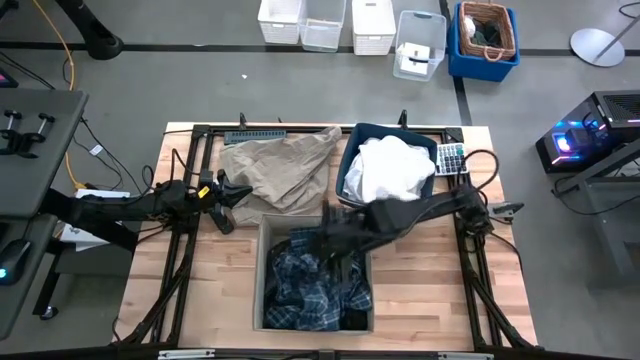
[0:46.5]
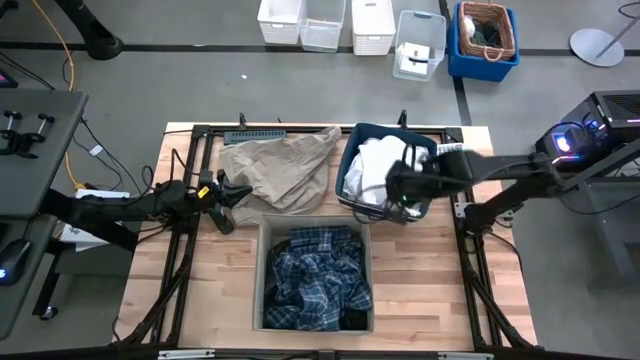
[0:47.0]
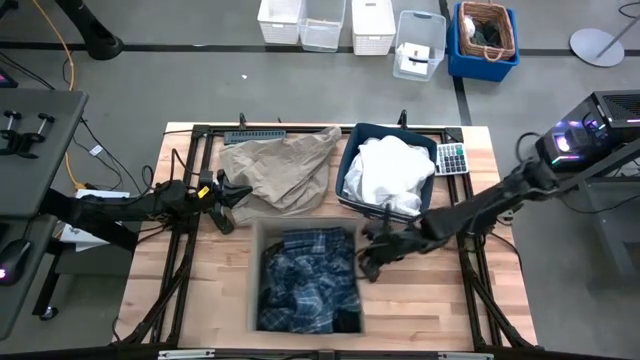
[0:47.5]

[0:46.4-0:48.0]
Task: Sort clothes
Move the white laundry bin to the left

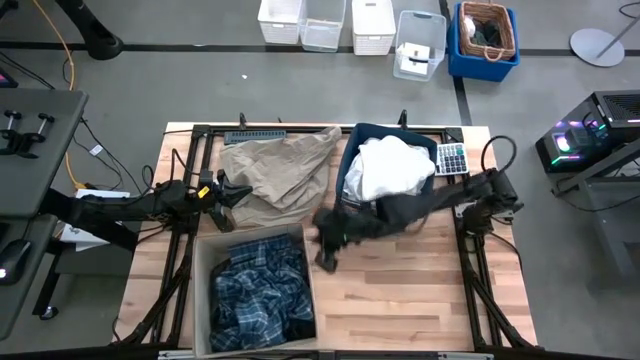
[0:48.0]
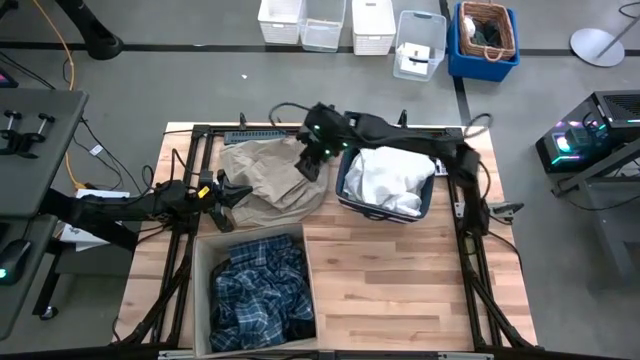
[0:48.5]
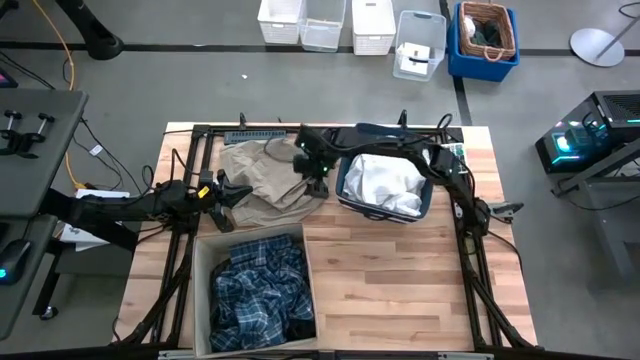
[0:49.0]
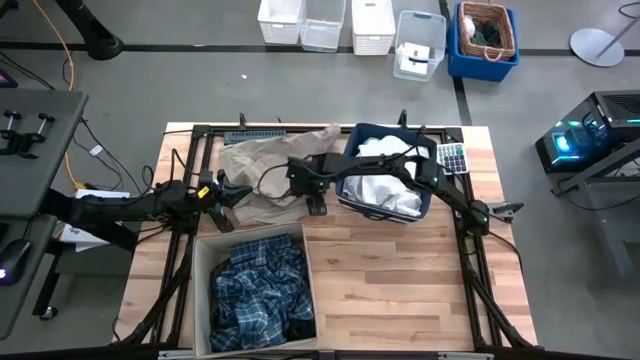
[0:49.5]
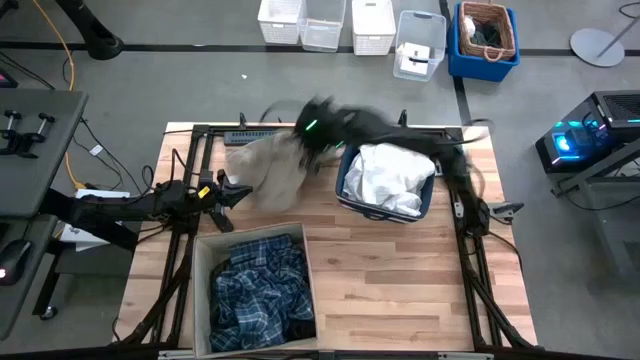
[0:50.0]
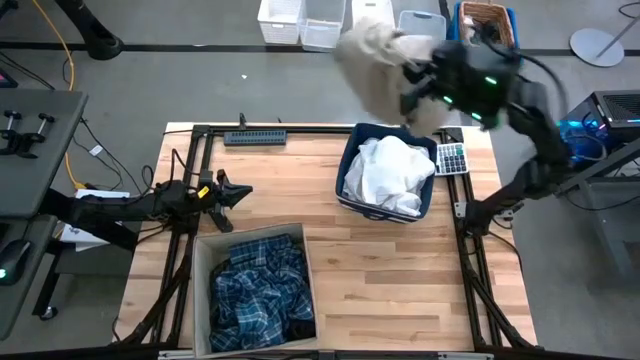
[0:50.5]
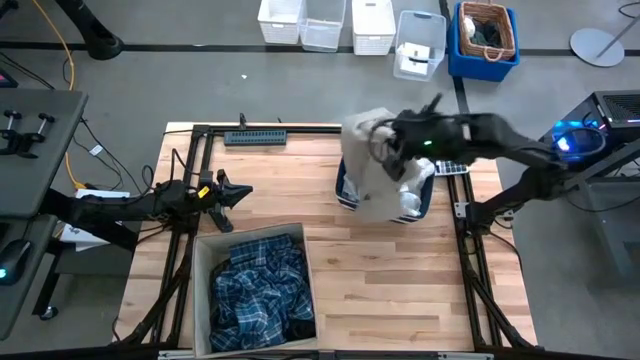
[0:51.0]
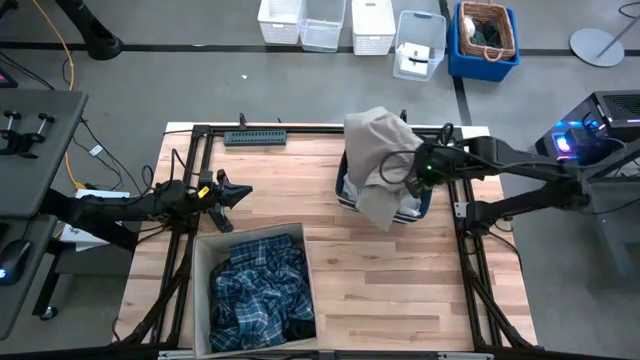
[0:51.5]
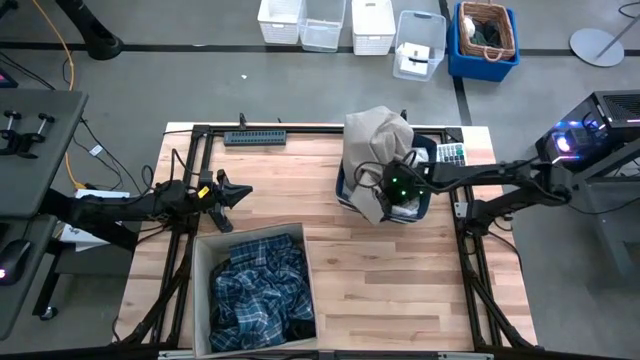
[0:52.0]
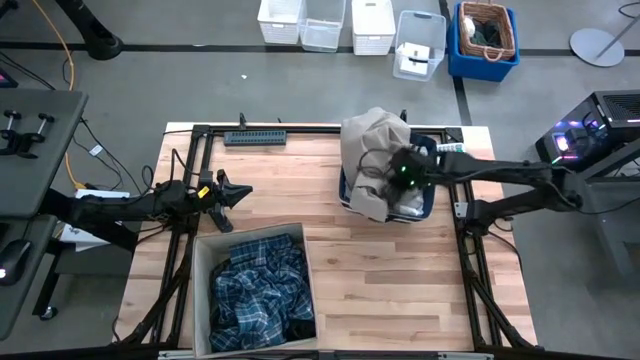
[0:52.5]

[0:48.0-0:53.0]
Put the brown shorts into the blue laundry bin

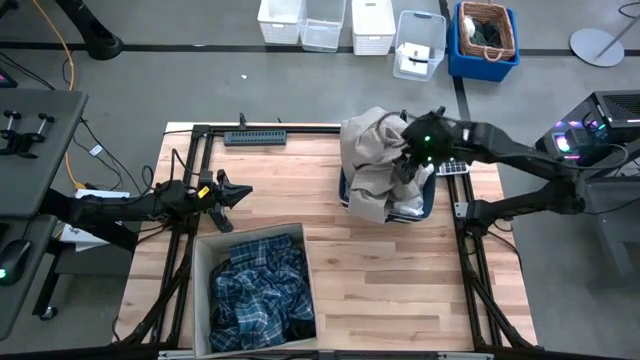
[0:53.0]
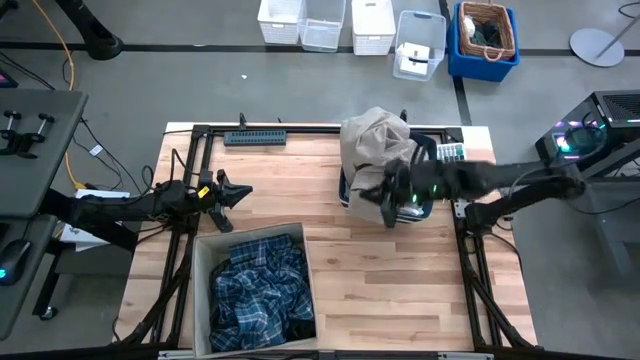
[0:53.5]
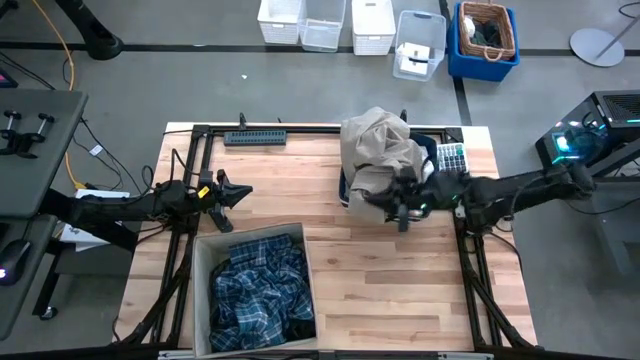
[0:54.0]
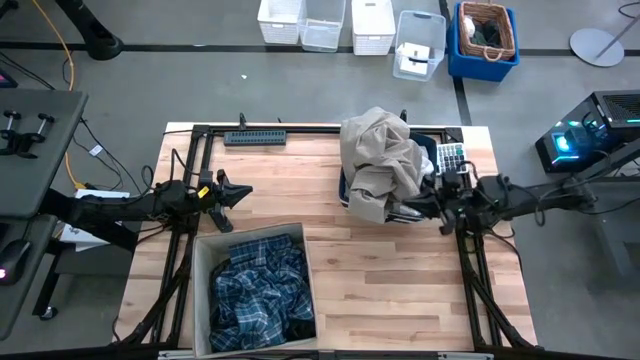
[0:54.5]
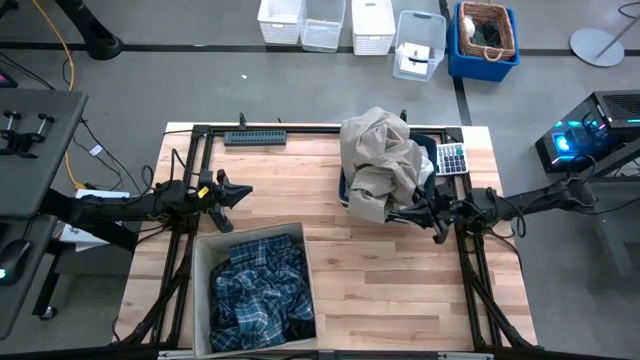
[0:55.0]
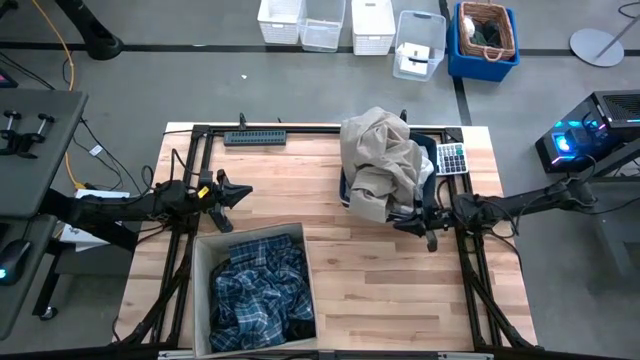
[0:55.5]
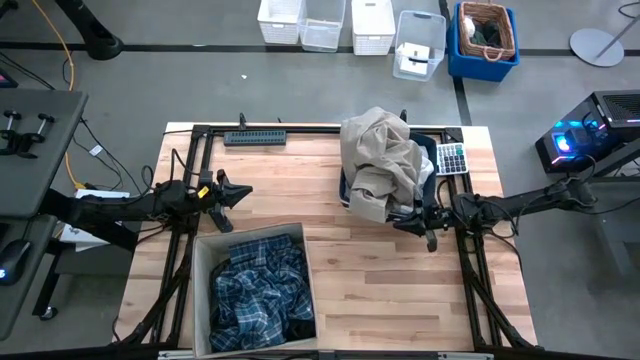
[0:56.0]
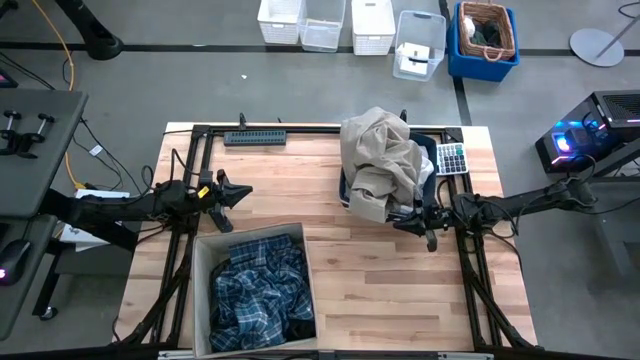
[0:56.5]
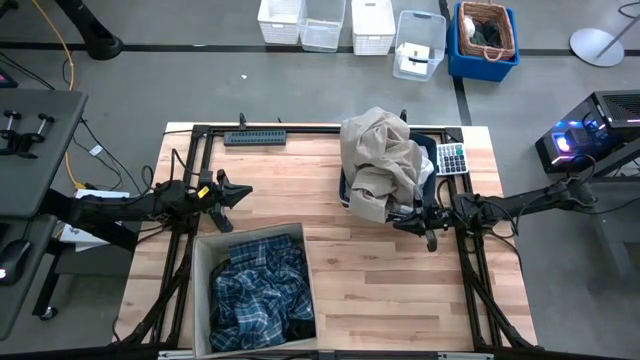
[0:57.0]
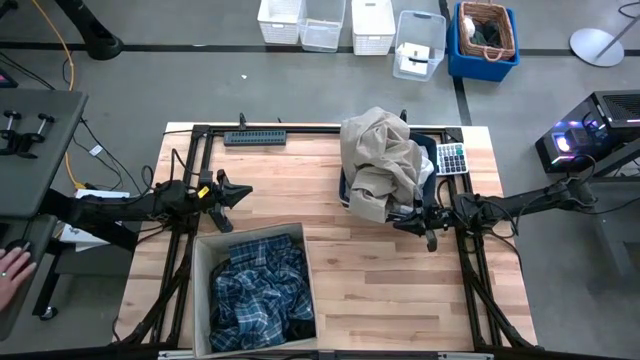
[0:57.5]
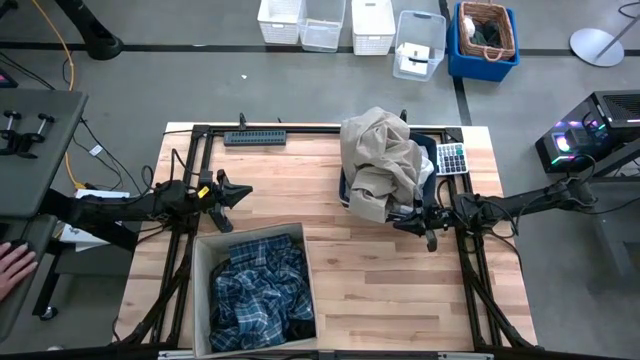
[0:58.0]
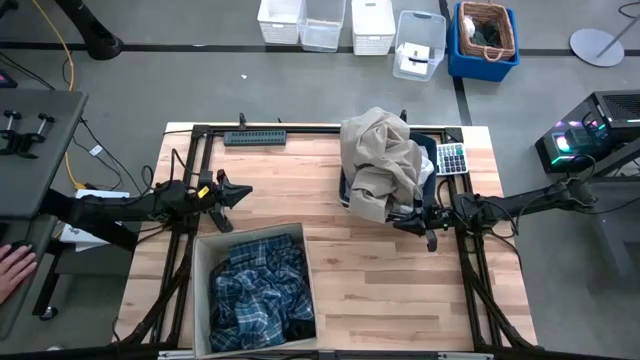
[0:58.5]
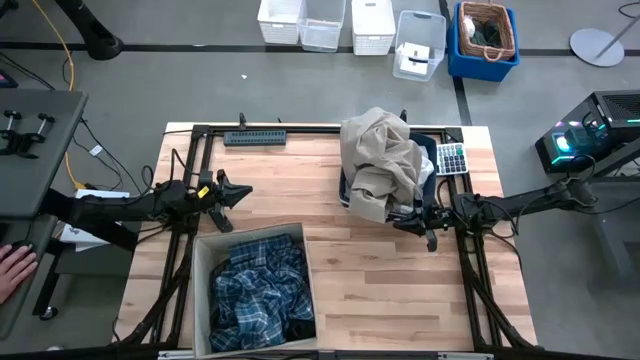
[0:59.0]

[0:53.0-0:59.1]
Return to Home Position

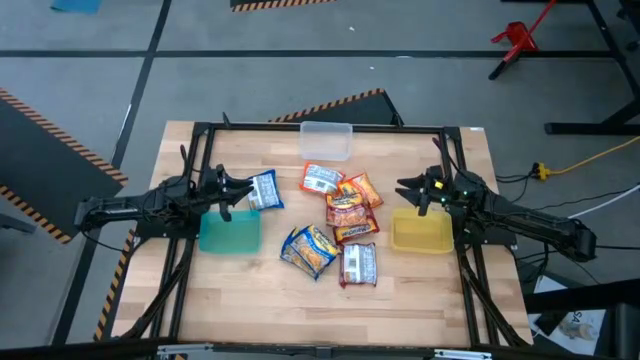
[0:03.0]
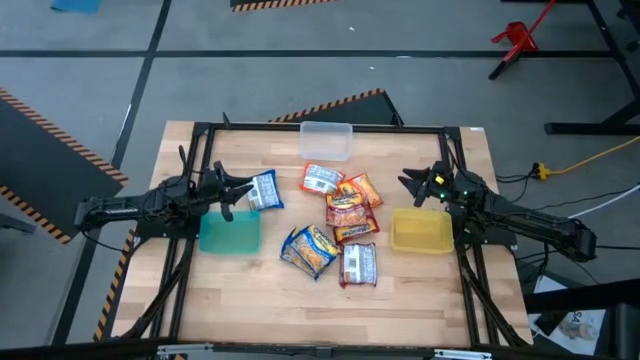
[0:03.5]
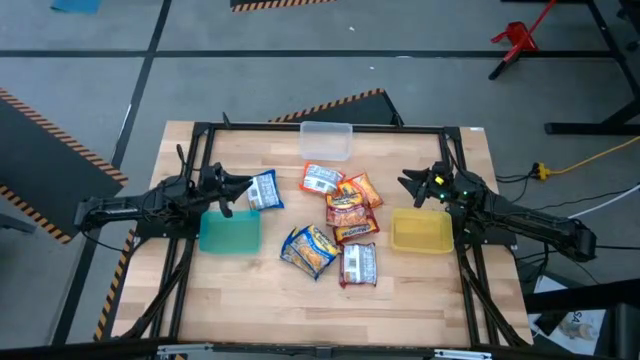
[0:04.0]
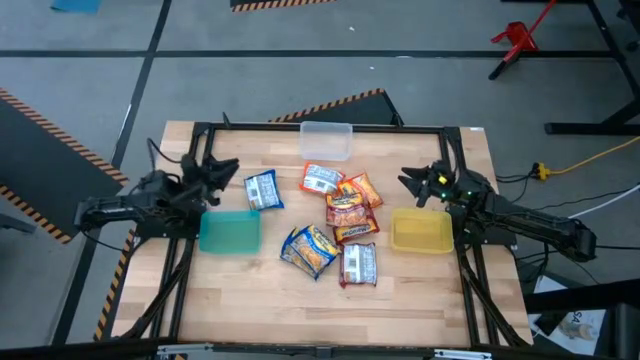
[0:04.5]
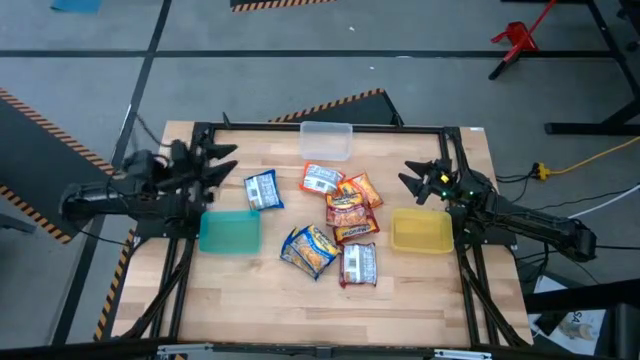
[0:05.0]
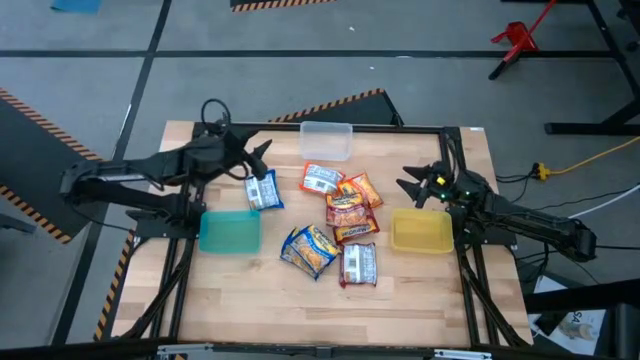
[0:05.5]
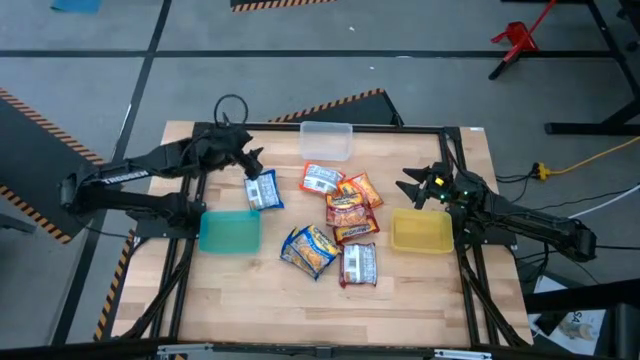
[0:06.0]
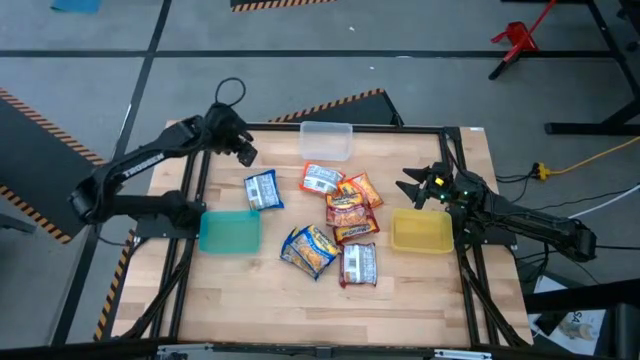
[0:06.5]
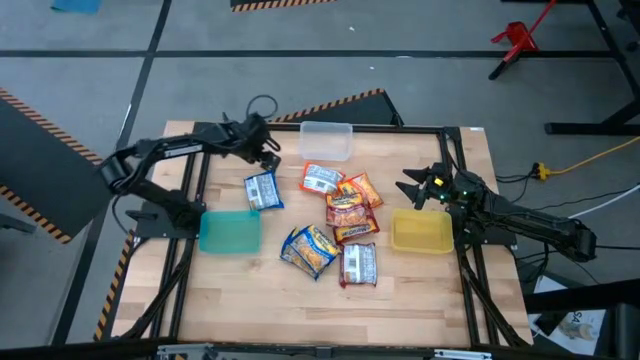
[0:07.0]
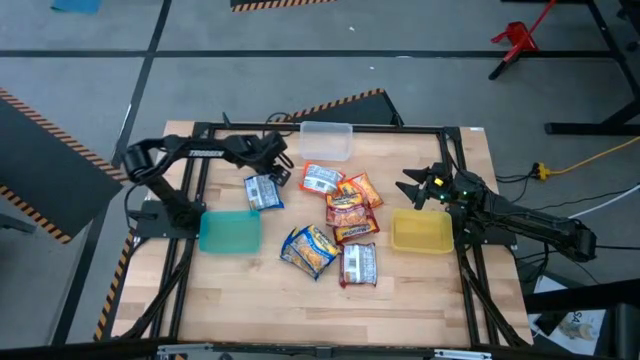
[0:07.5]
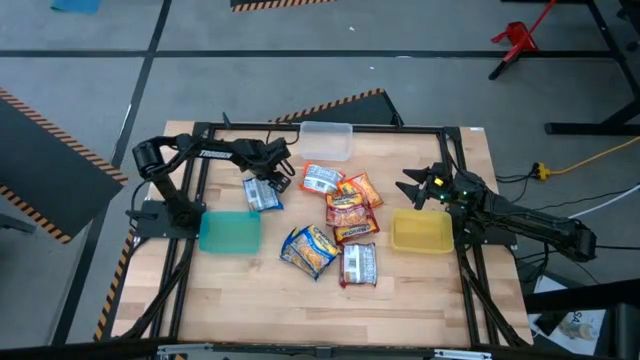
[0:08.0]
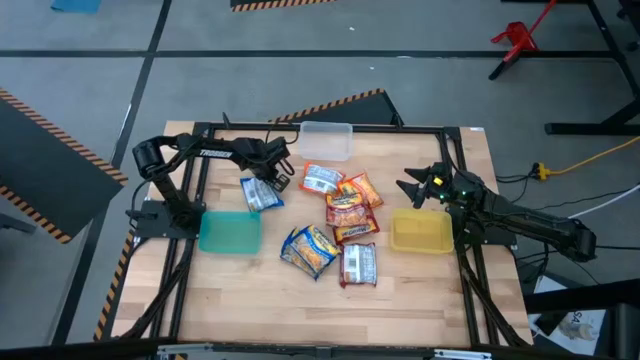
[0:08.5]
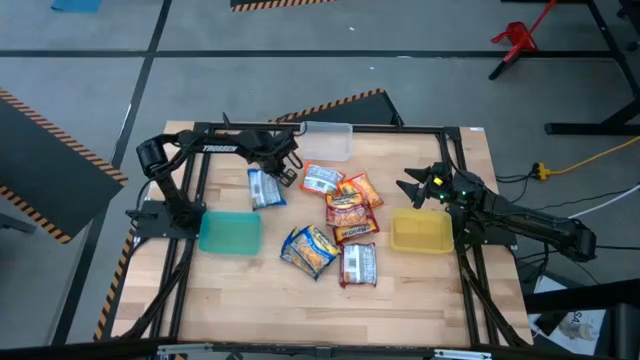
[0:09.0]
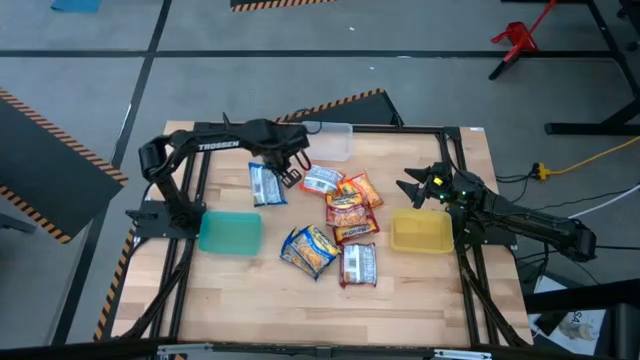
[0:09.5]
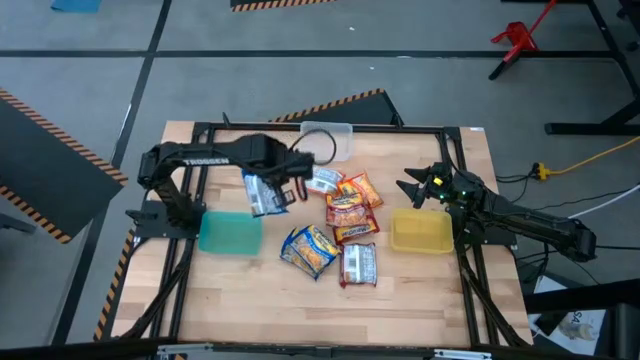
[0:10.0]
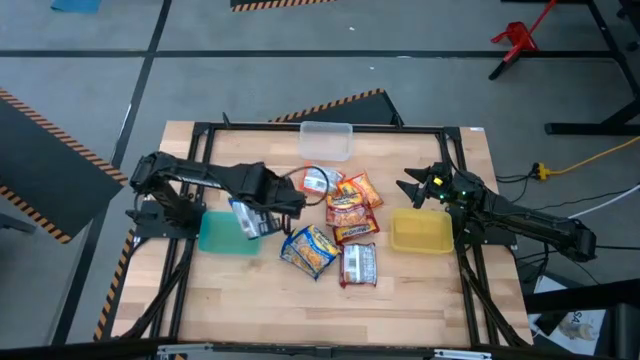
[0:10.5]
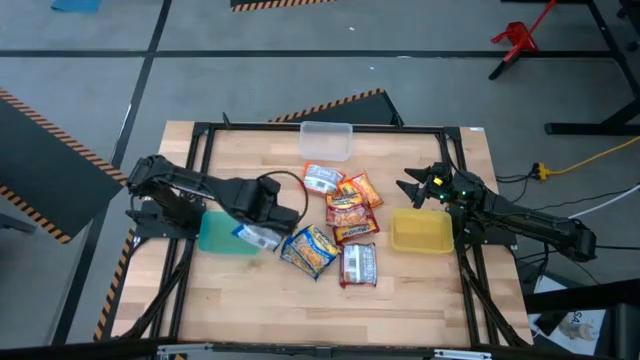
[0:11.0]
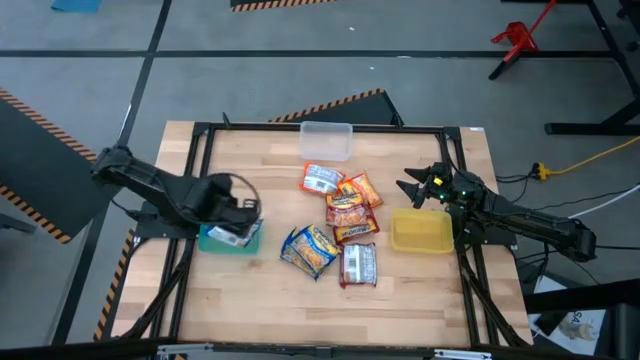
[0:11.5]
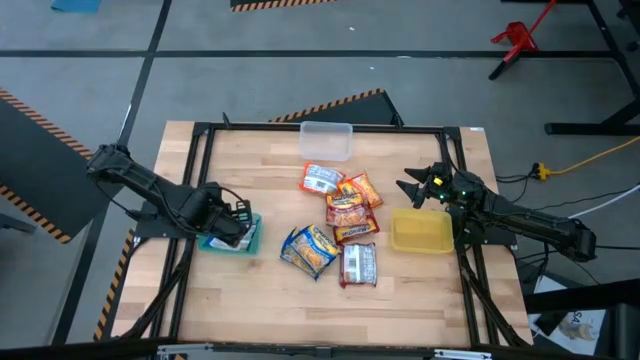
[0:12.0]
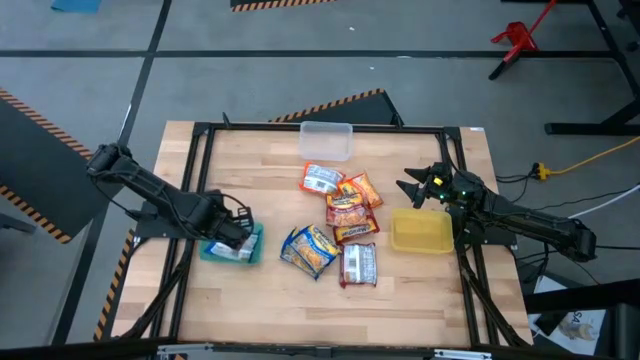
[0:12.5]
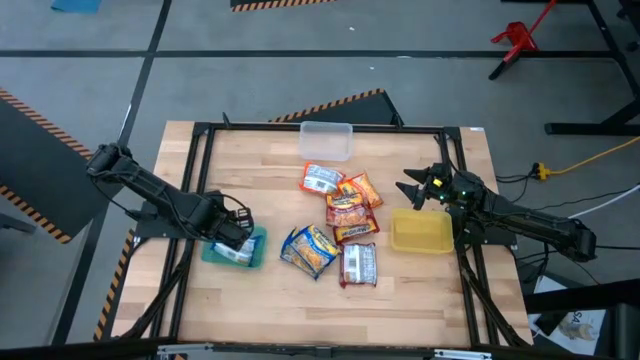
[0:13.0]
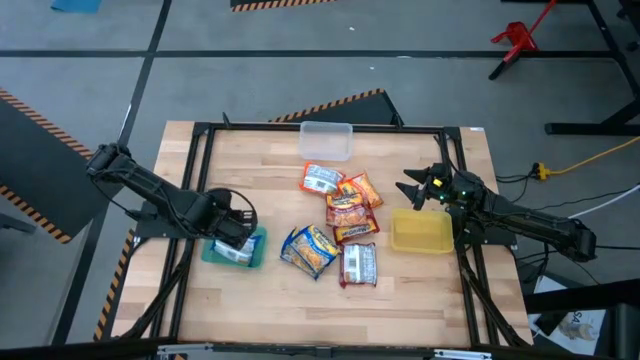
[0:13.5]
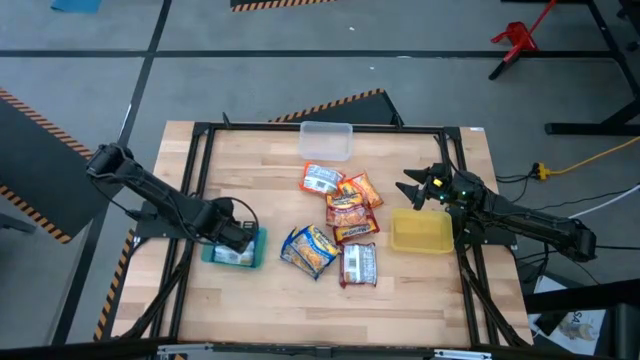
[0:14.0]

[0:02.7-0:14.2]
Task: Sort Maruchan noodles
Put the top left blue noodle pack into the green bin
